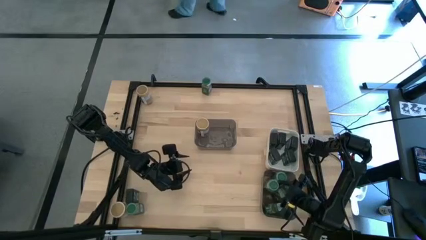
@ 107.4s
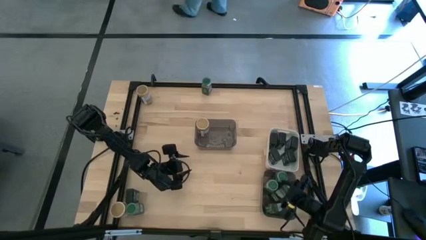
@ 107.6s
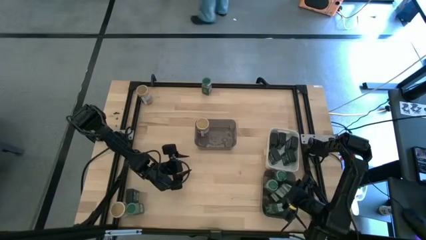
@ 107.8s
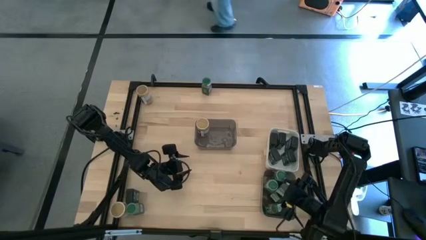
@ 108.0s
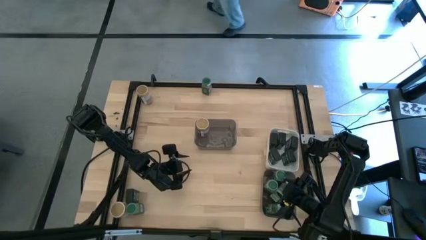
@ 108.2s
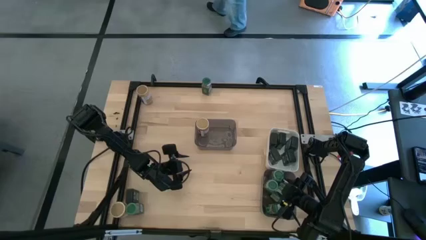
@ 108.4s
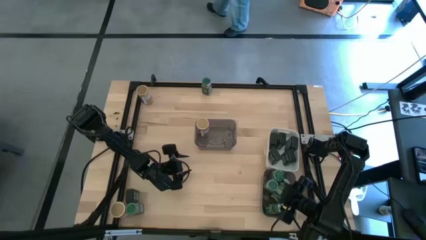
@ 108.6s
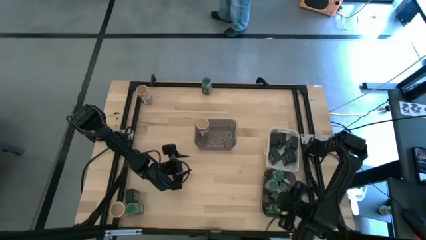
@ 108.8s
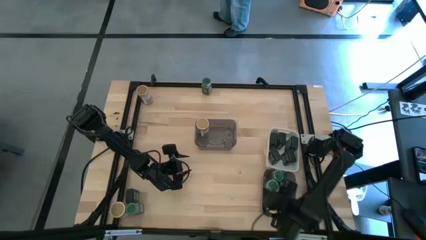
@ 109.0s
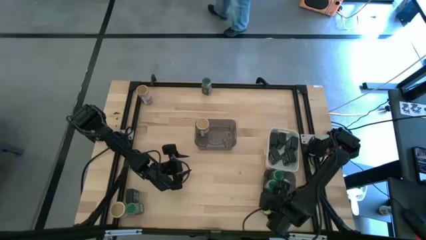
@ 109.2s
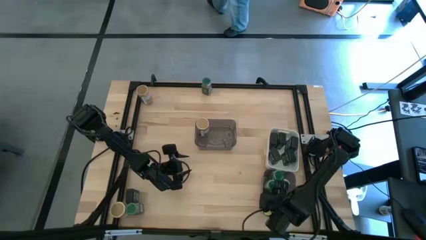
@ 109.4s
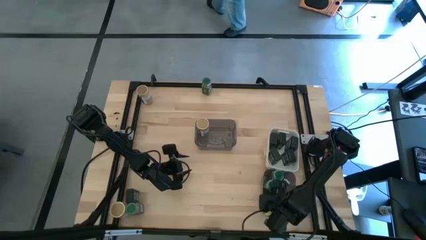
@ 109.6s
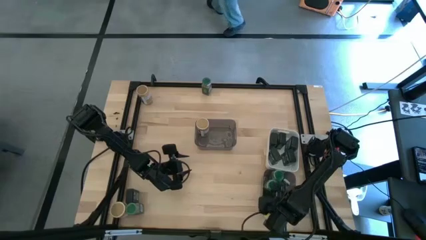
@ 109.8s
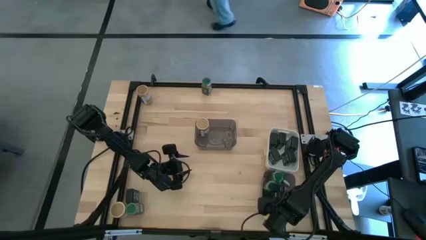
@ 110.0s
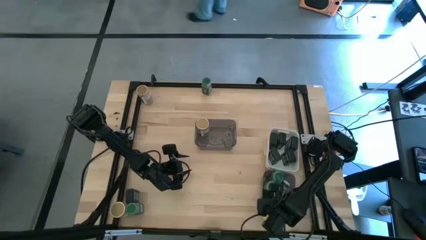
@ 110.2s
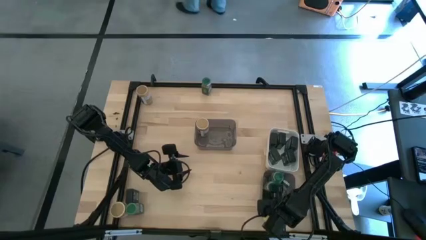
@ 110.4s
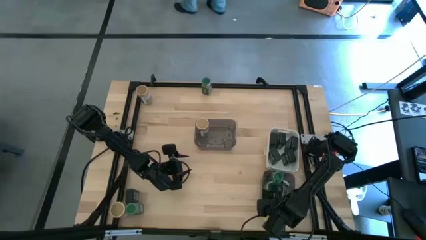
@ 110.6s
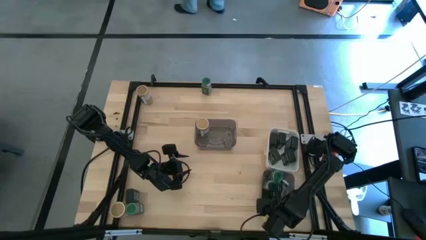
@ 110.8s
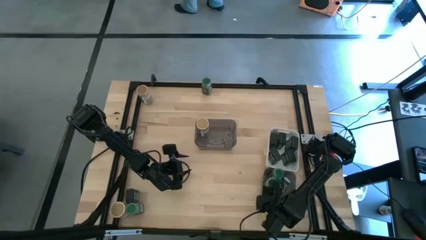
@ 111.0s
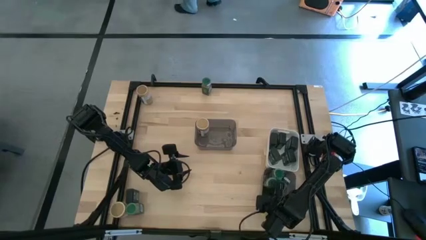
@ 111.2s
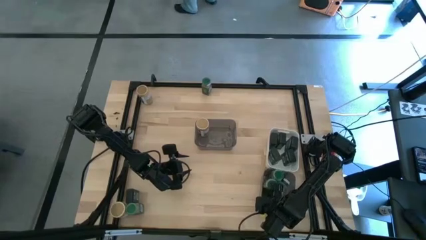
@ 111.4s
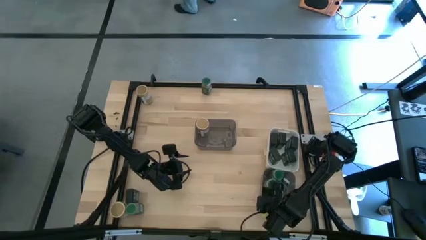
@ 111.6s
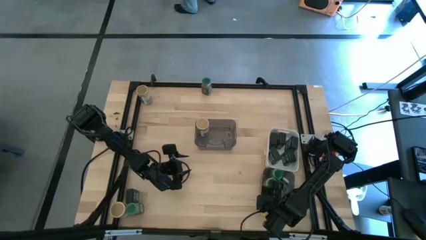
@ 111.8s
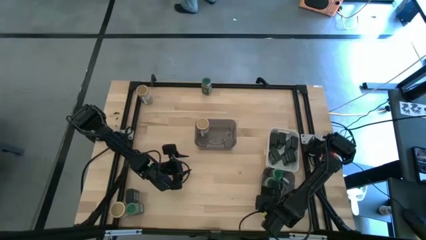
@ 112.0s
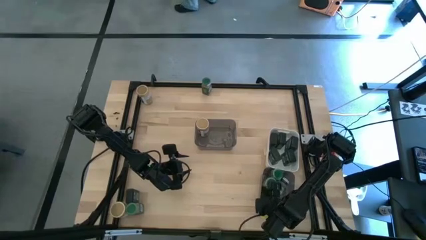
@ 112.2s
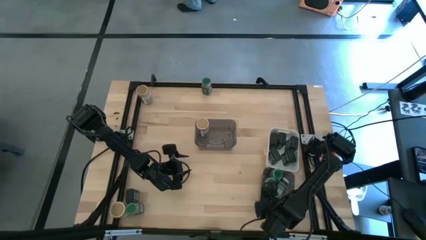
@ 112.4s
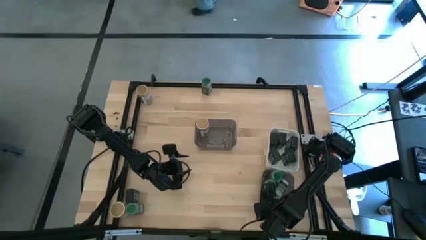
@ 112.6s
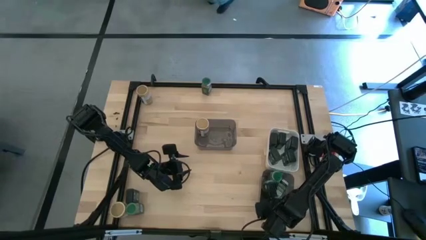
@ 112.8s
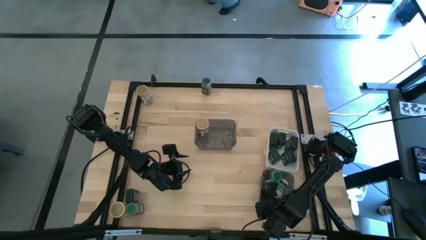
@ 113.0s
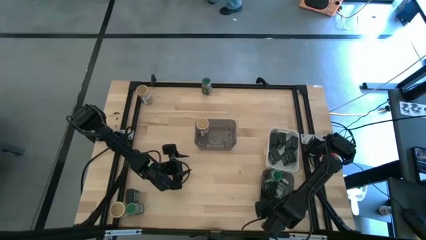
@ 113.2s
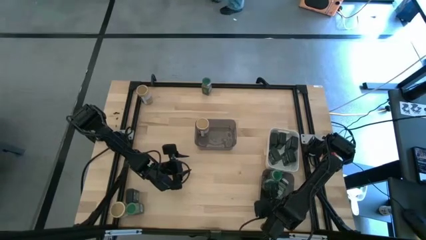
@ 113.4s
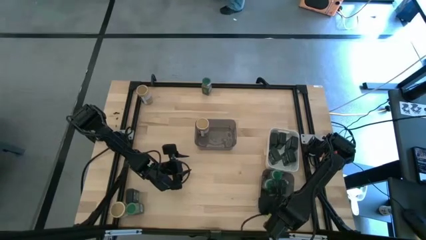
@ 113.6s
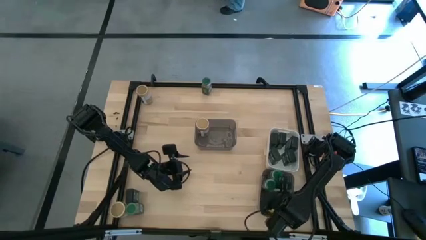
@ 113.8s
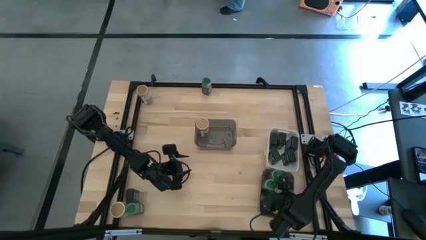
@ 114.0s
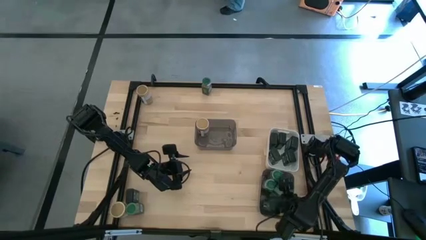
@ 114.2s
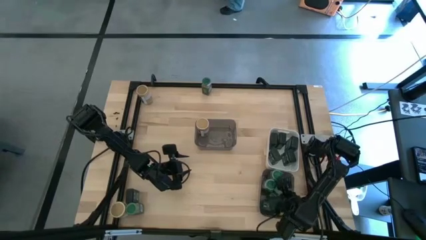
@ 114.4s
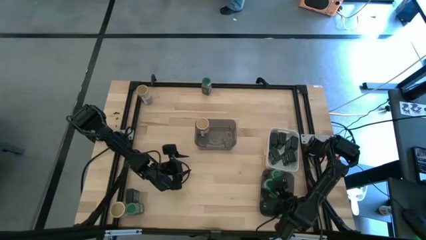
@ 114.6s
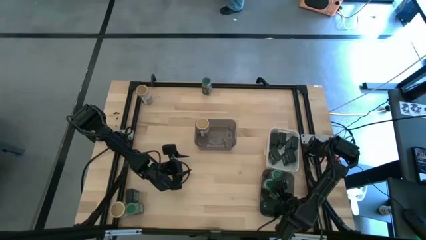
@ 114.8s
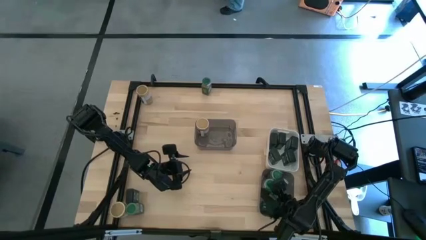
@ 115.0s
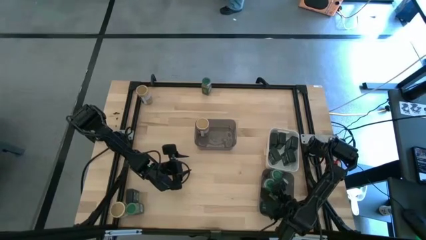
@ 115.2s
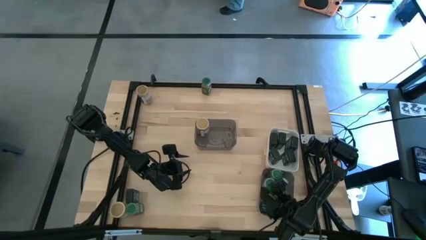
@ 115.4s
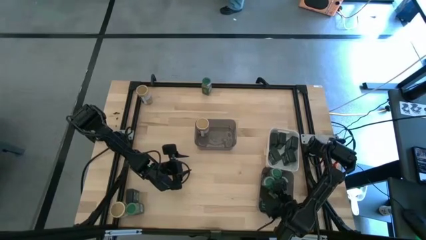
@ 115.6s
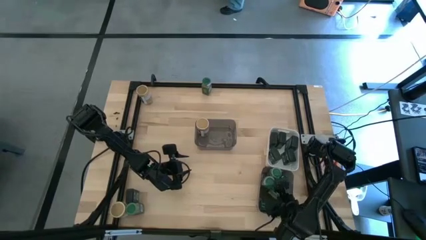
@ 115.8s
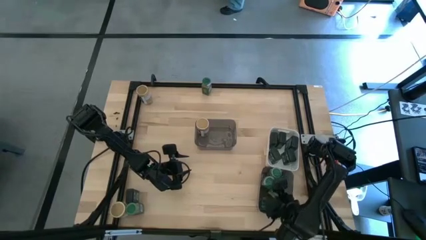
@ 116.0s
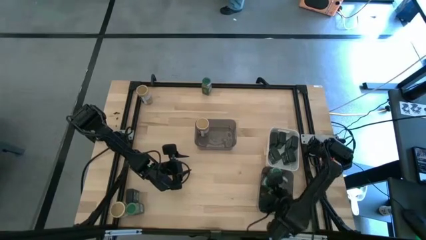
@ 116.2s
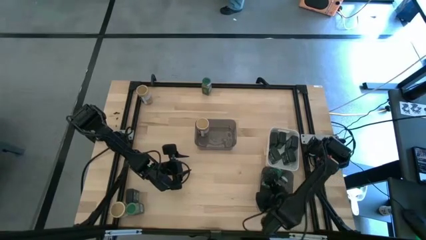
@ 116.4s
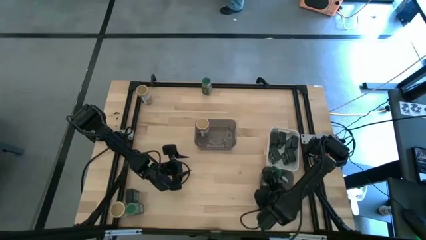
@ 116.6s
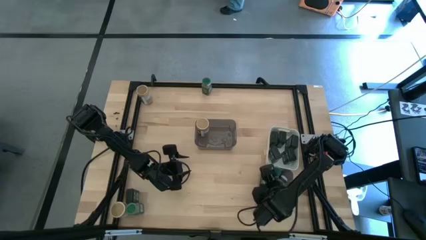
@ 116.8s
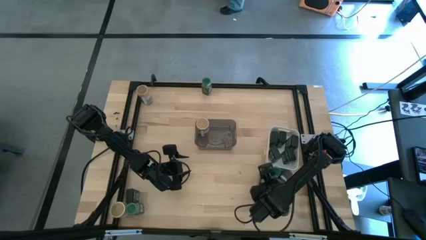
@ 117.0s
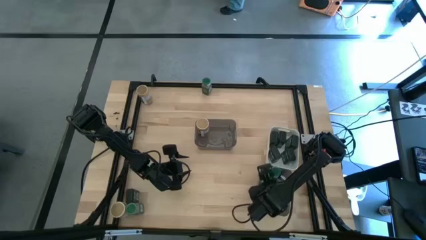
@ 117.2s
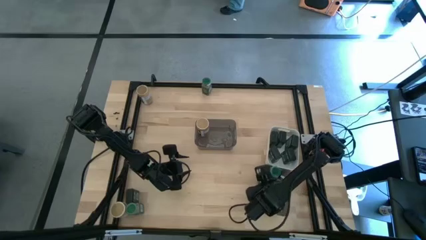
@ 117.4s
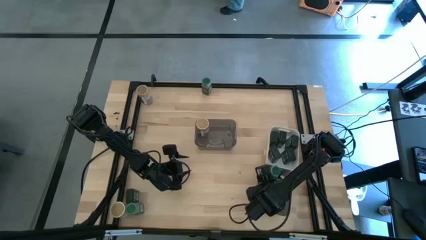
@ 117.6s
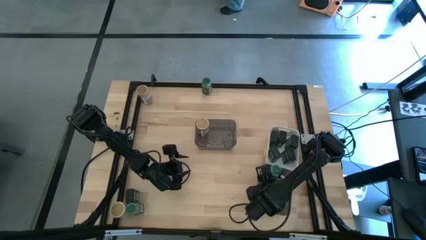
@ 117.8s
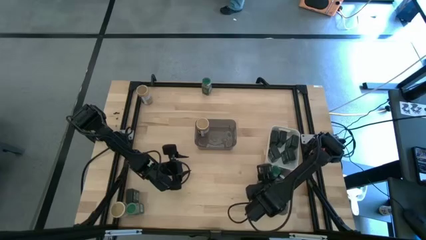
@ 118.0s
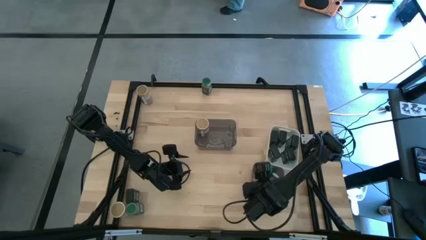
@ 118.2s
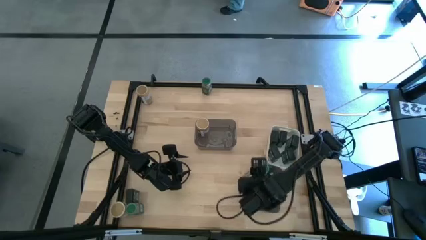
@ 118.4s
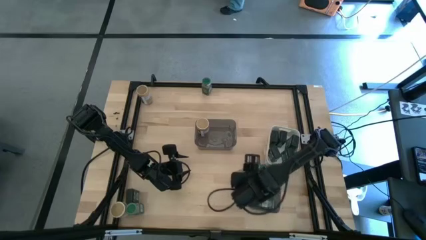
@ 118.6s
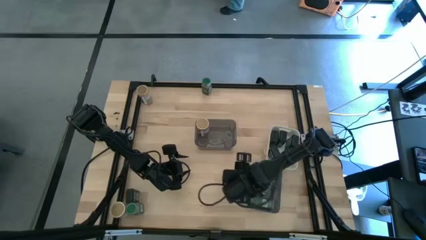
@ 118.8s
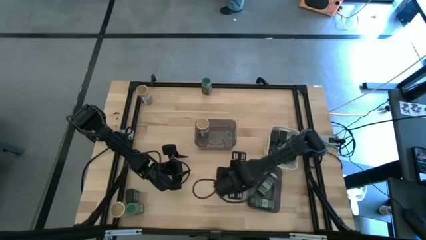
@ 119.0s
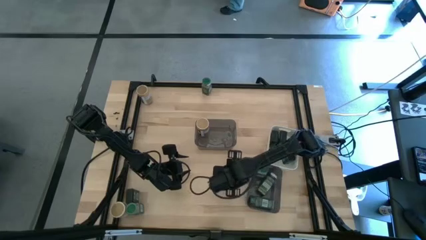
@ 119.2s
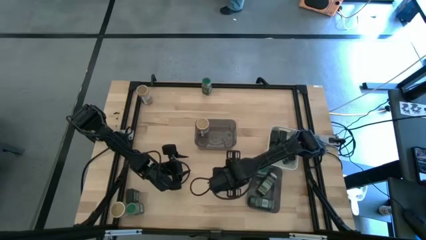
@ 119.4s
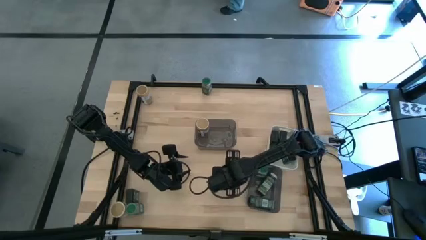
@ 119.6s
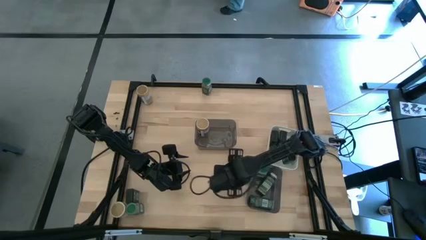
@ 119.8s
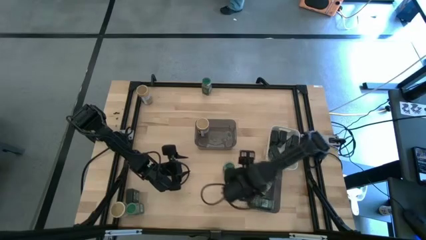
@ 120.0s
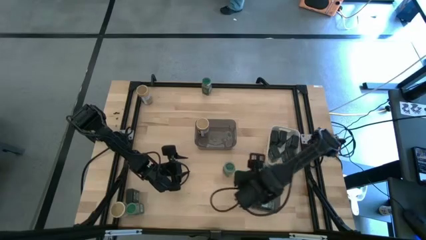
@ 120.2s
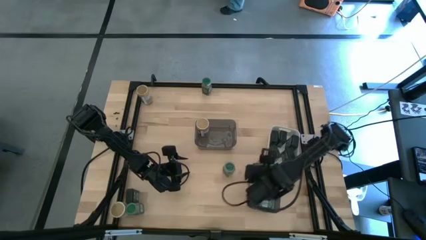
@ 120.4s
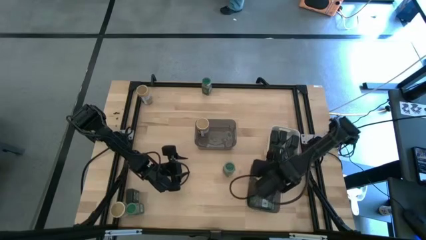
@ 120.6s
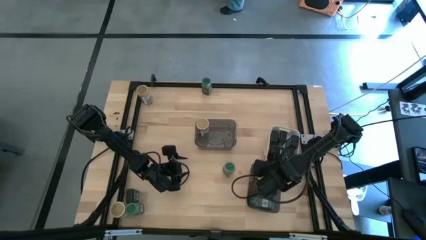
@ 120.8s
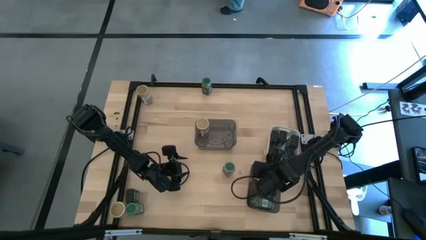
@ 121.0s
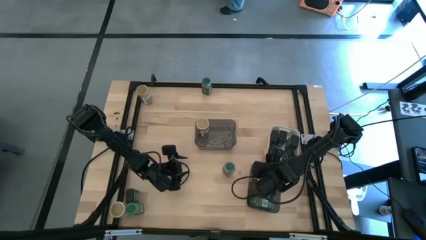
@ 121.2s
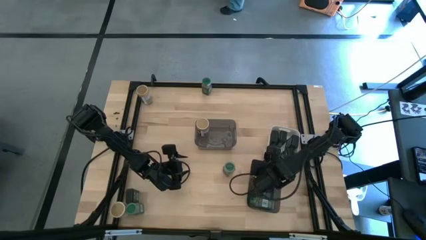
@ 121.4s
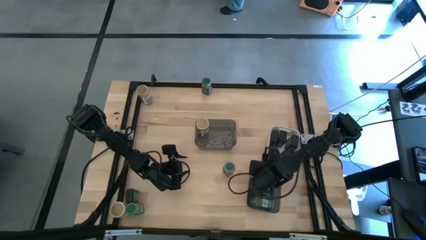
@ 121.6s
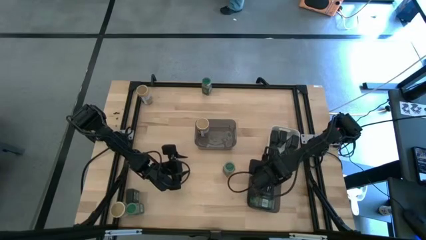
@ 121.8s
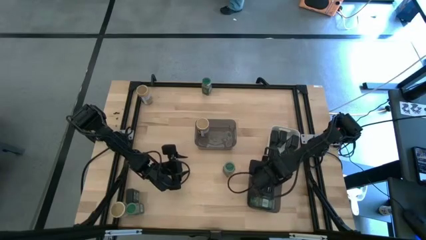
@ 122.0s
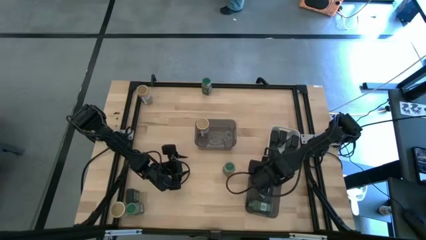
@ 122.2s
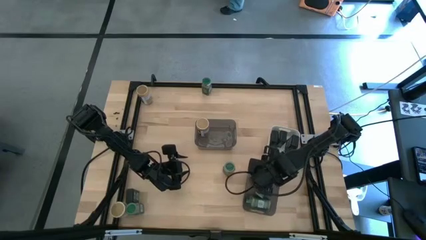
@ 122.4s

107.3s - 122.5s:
Task: Sort spices by type
Adjust the green seasoning bottles

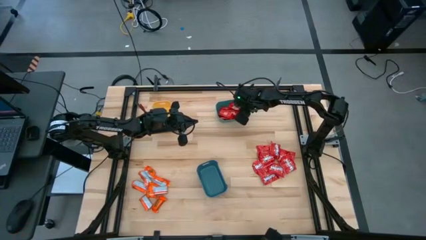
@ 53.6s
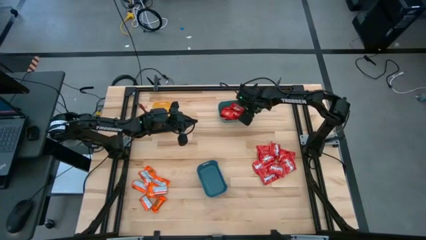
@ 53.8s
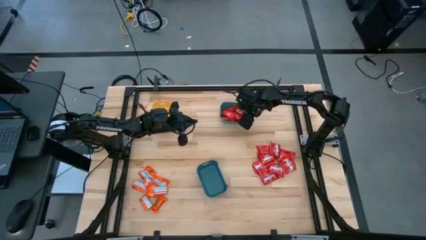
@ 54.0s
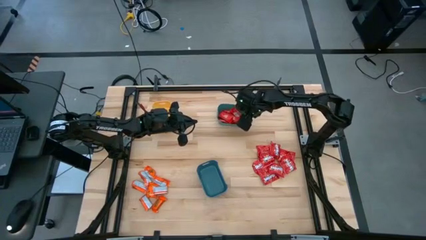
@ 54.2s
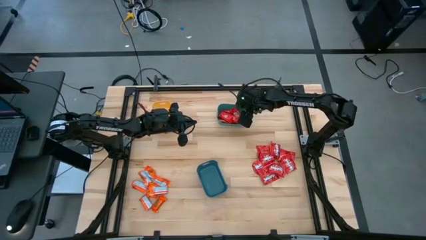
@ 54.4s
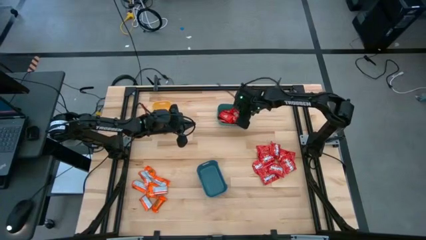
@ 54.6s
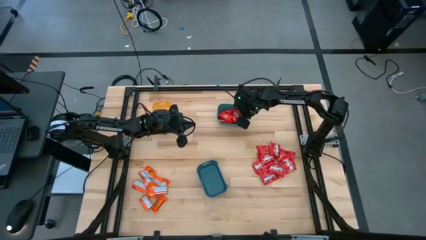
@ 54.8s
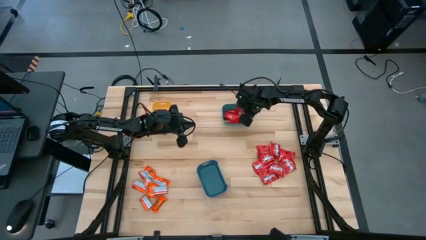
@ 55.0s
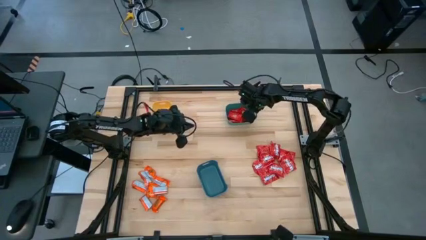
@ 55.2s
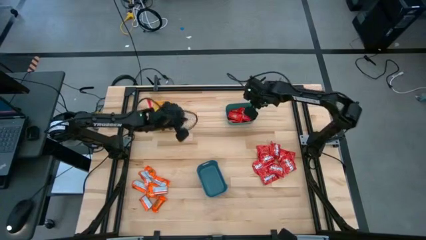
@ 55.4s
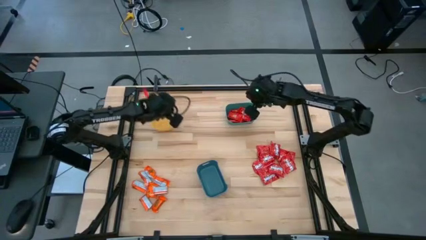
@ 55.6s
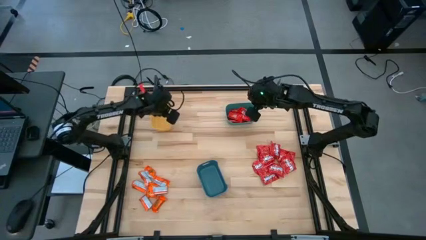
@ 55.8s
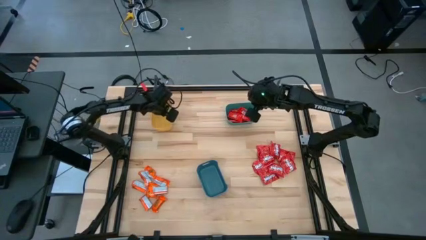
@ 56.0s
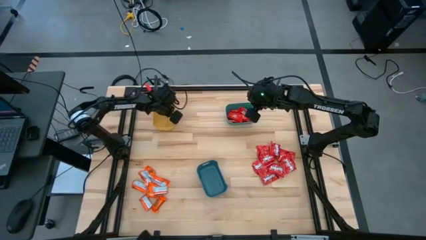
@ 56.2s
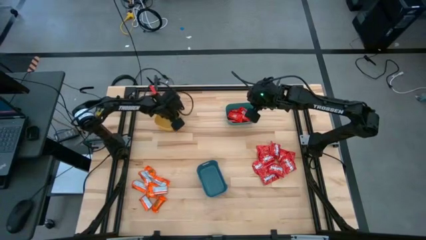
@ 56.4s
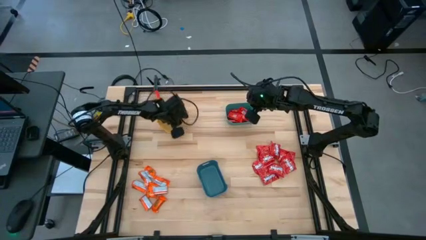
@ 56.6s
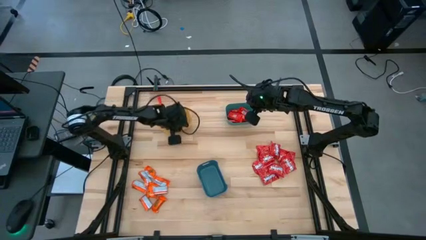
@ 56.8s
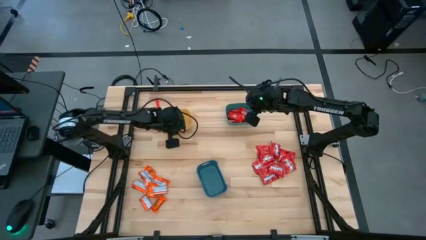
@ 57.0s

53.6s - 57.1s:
Task: Sort candy
Adjust the green bin and yellow bin
